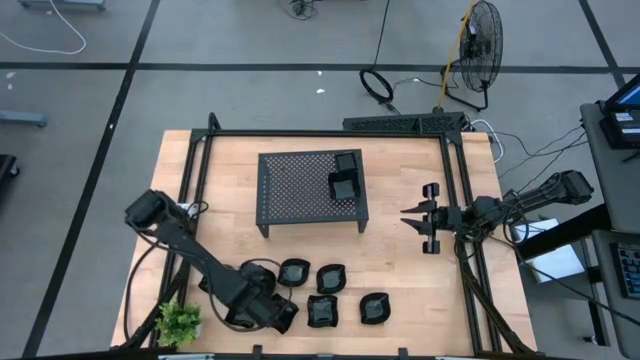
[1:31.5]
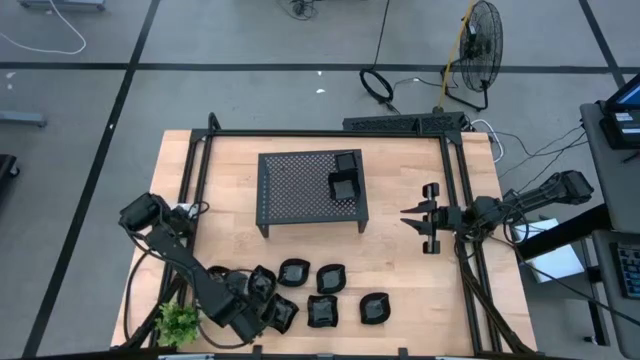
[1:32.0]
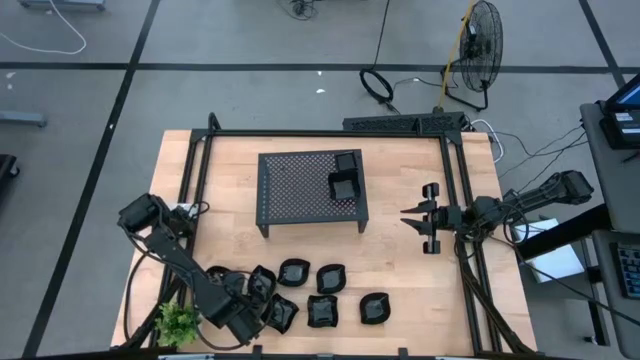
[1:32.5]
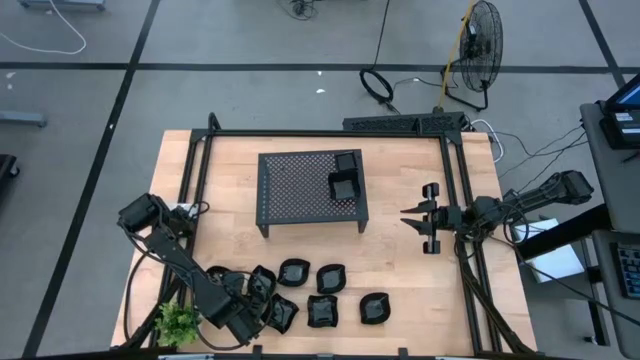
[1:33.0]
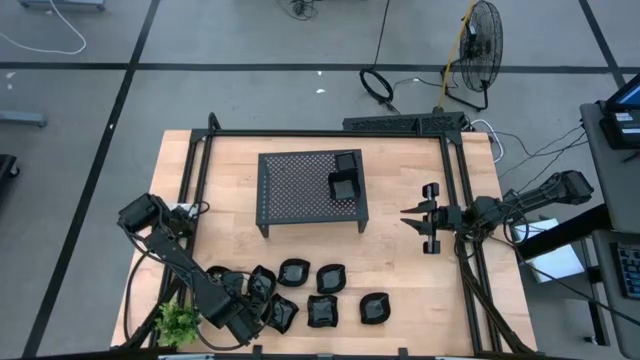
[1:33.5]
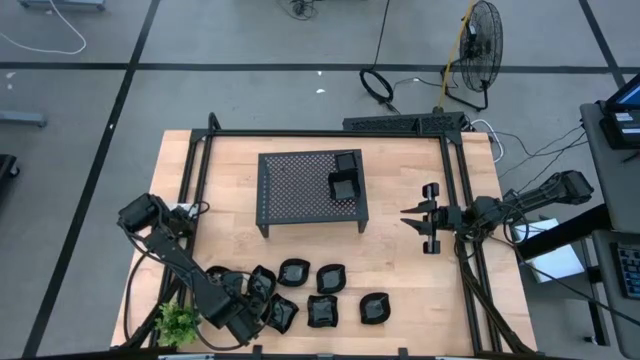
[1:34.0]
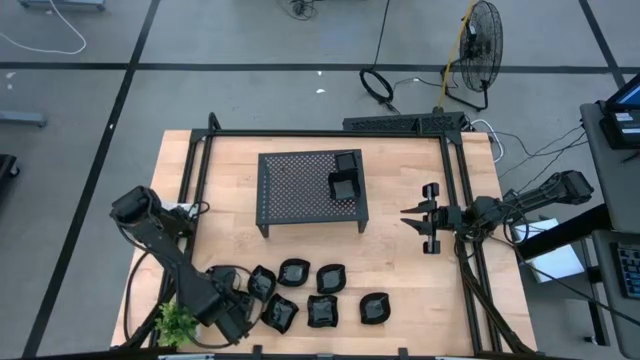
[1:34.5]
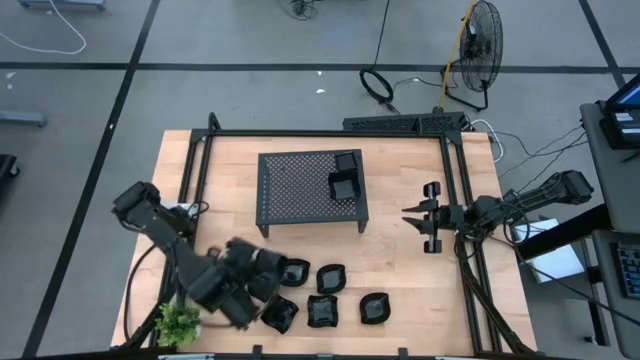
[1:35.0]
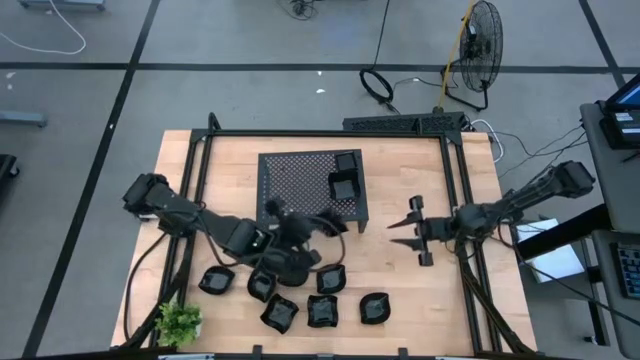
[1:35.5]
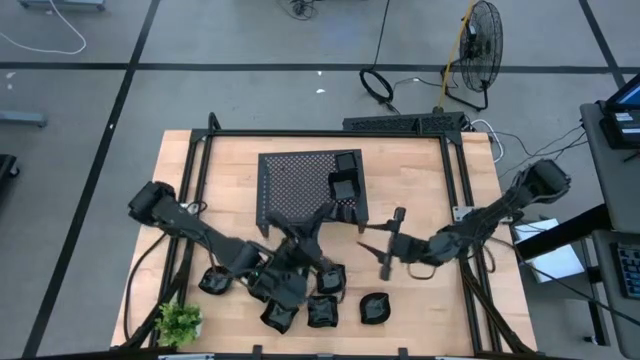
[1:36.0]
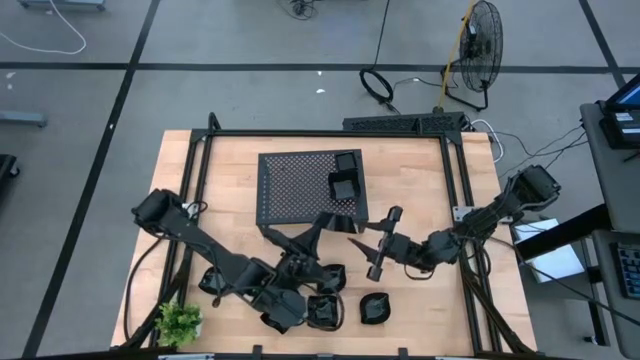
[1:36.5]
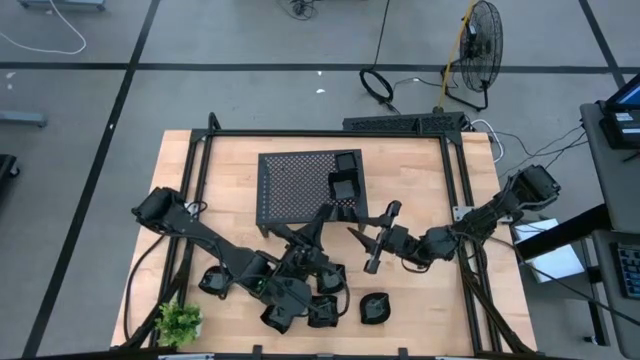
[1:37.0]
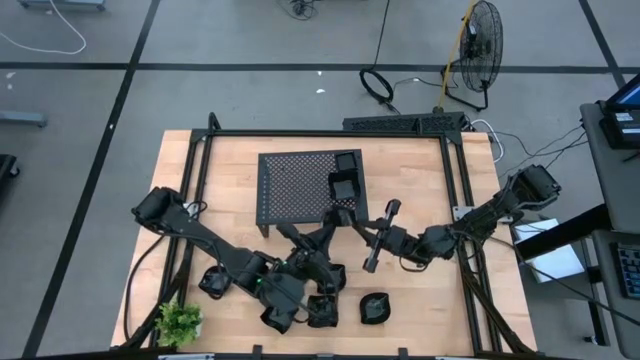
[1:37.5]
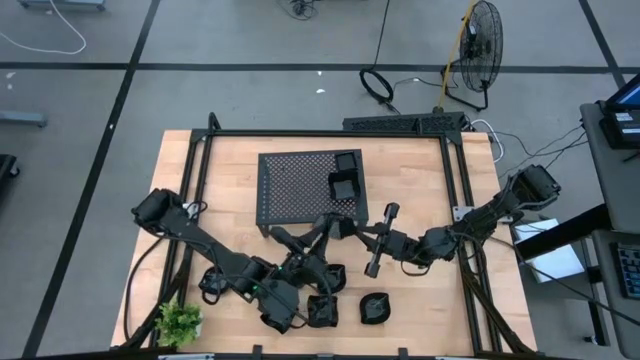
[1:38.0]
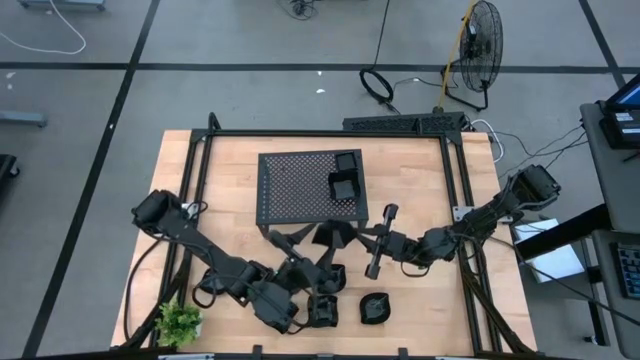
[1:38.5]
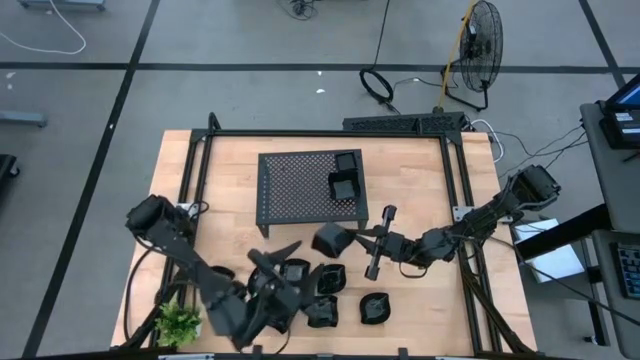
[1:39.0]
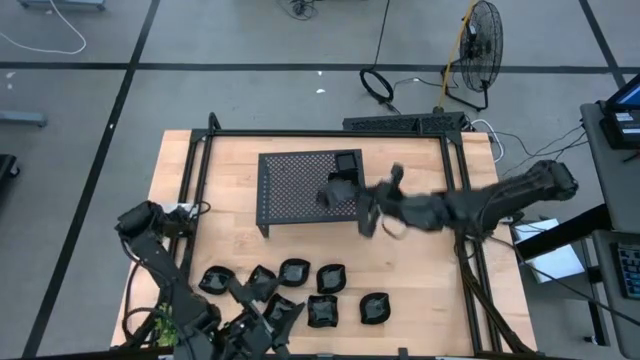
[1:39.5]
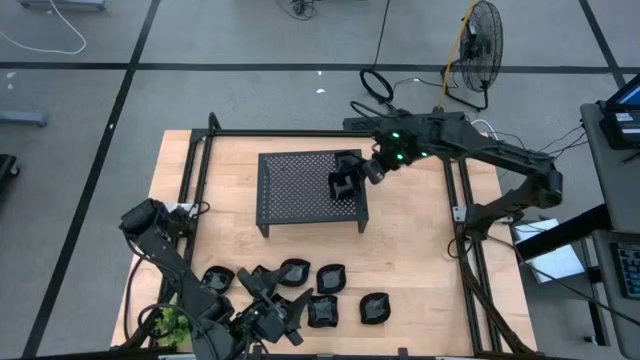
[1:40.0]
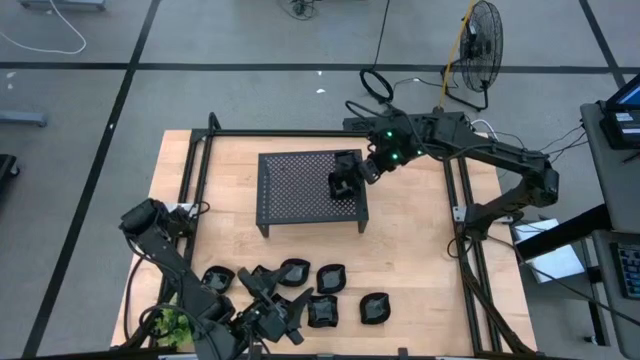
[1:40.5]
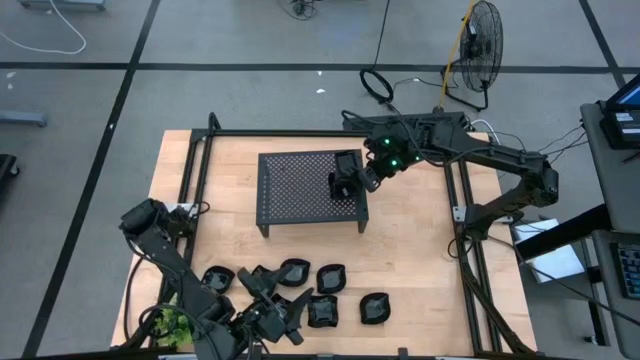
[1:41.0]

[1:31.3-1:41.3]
Task: Pick & Place Mini shaped plates
Stack the distorted square plate onto the stacked distorted square plate on the shelf

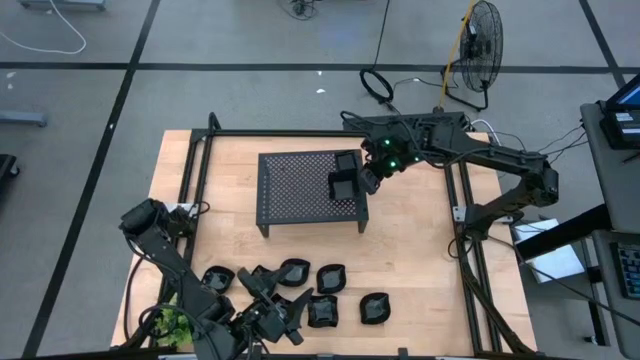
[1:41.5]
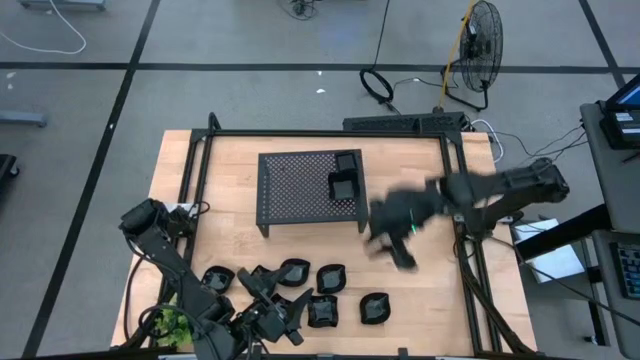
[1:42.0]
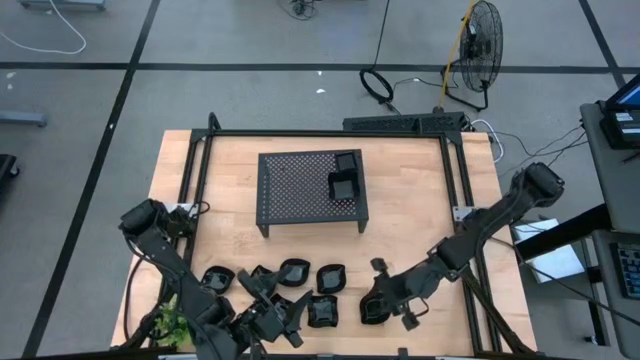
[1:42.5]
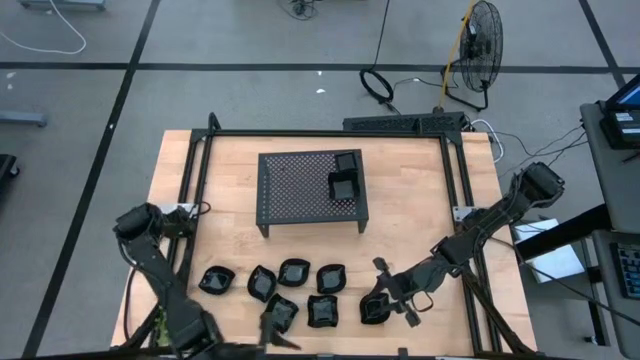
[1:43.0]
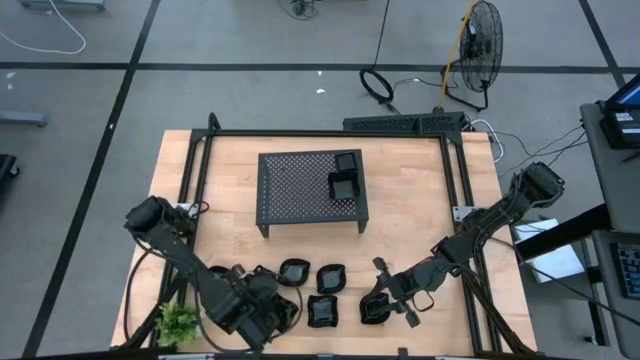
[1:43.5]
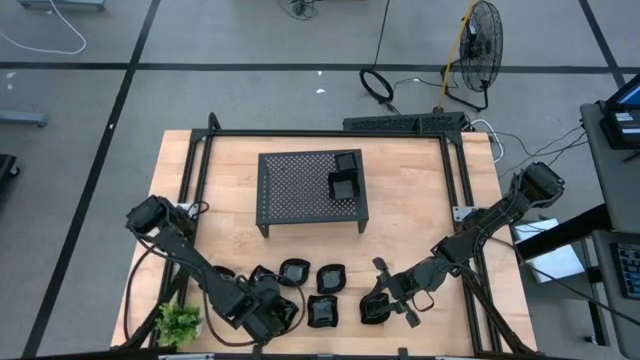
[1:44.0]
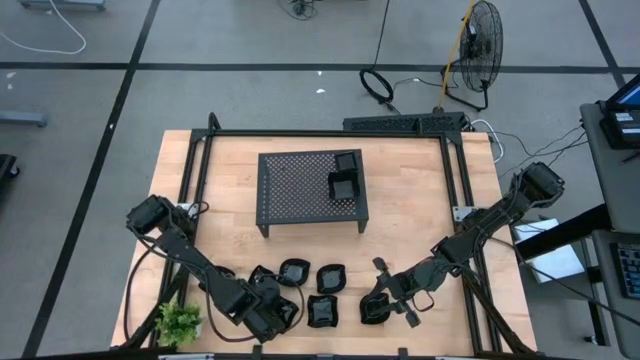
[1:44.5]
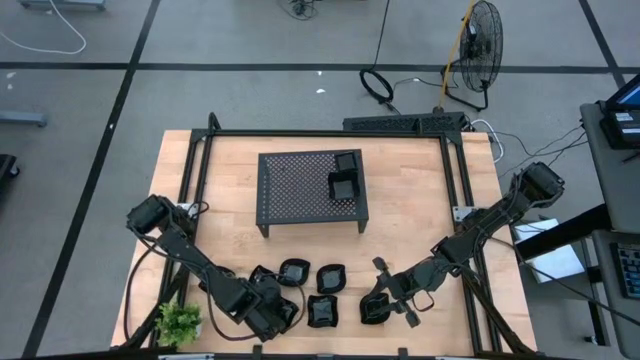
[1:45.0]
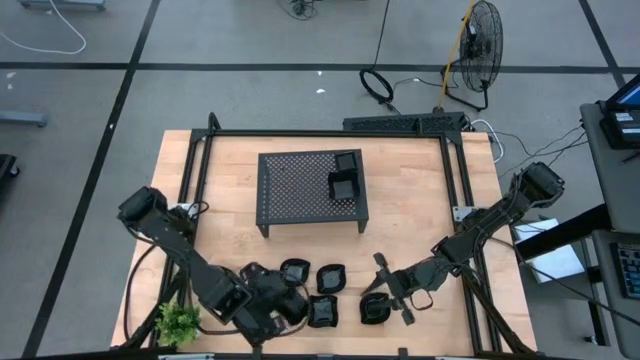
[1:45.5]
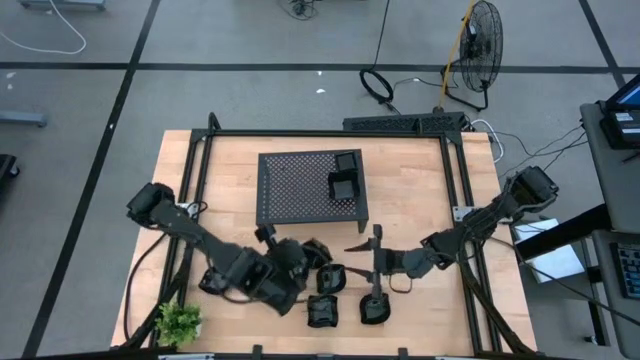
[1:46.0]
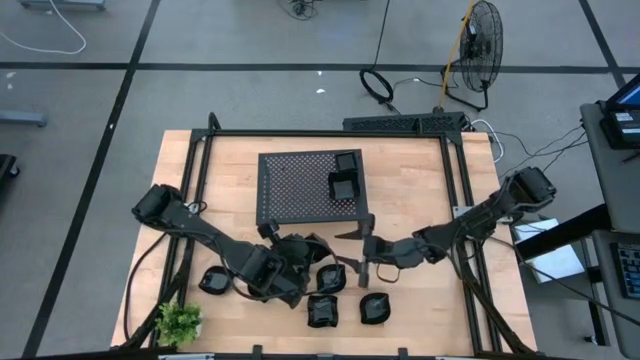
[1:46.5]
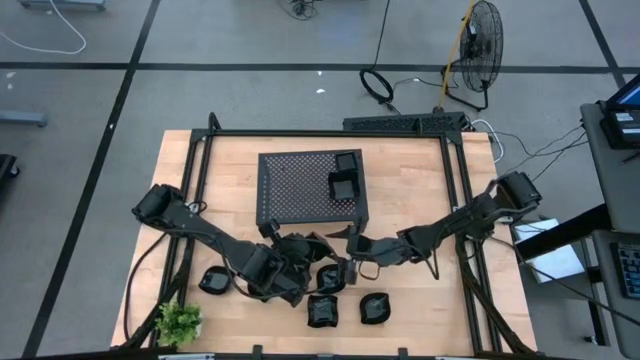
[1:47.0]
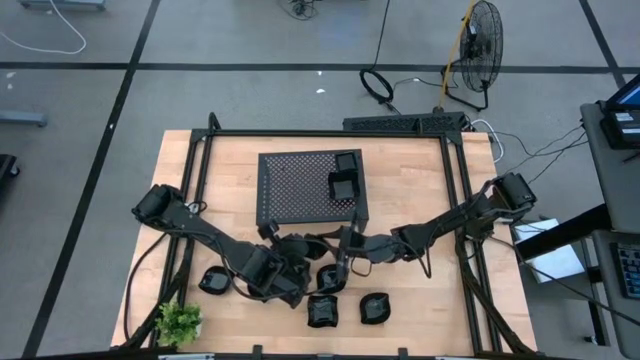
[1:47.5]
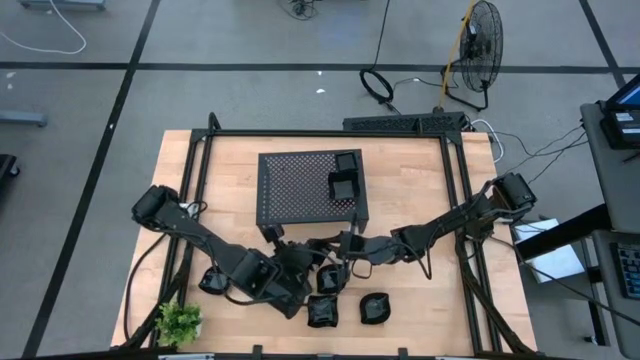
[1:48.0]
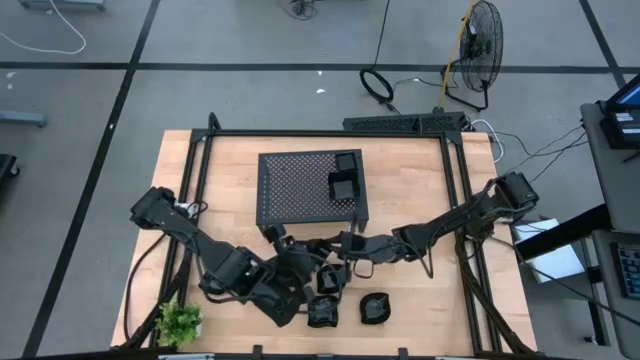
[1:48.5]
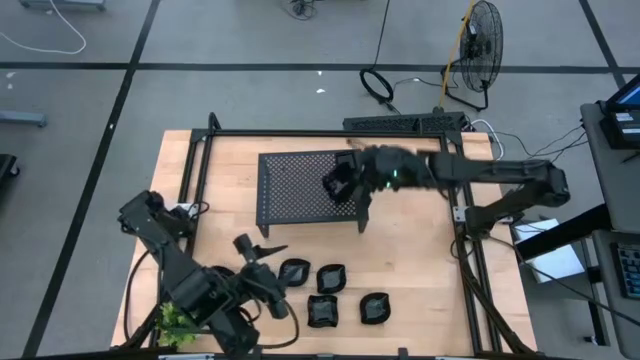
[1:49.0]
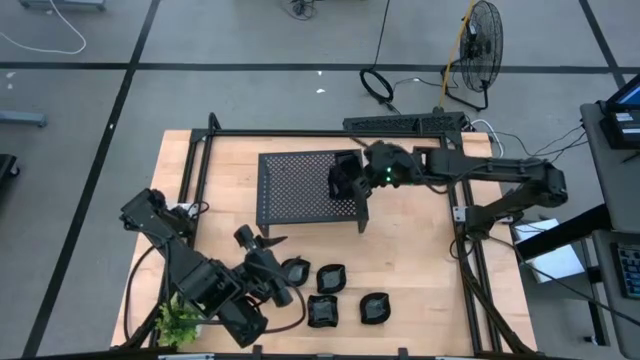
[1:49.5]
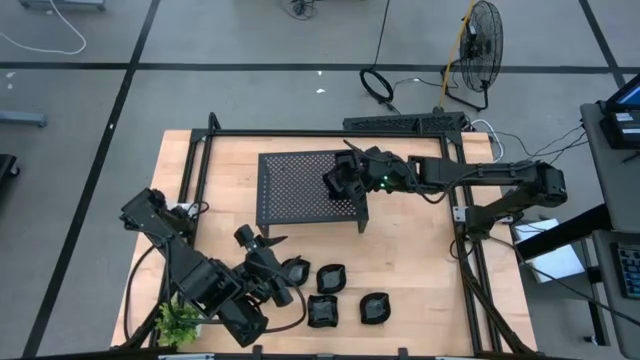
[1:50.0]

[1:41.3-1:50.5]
Stack the distorted square plate onto the stacked distorted square plate on the shelf

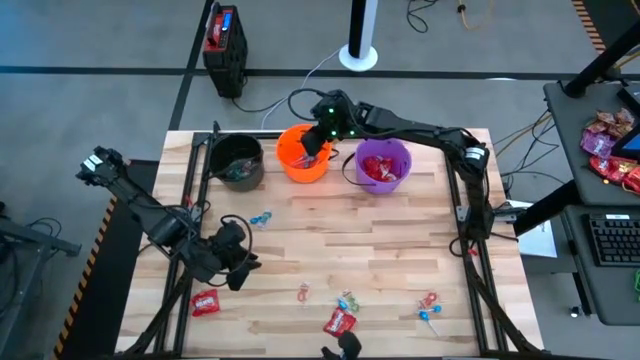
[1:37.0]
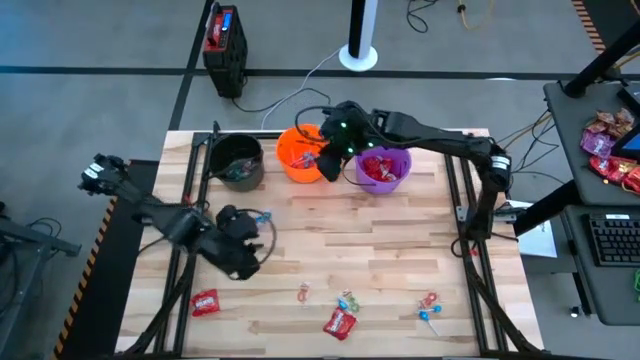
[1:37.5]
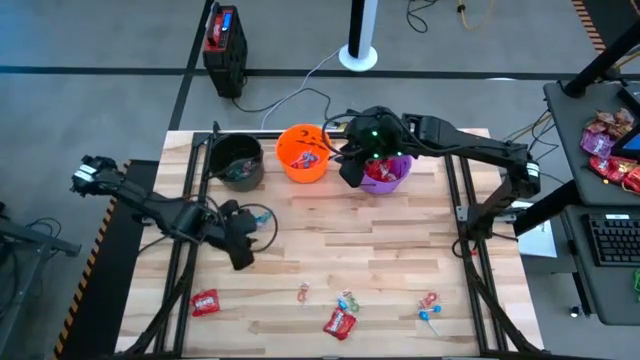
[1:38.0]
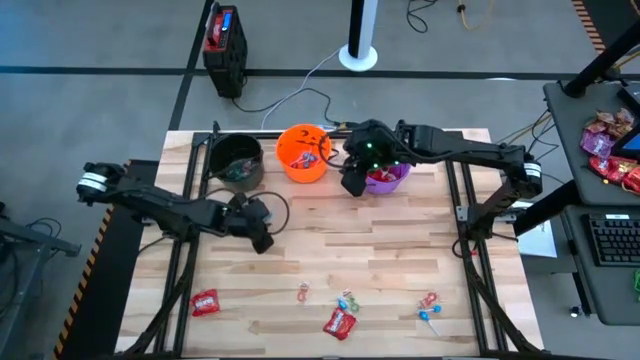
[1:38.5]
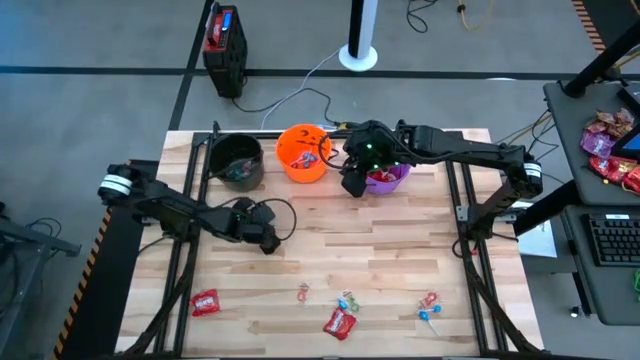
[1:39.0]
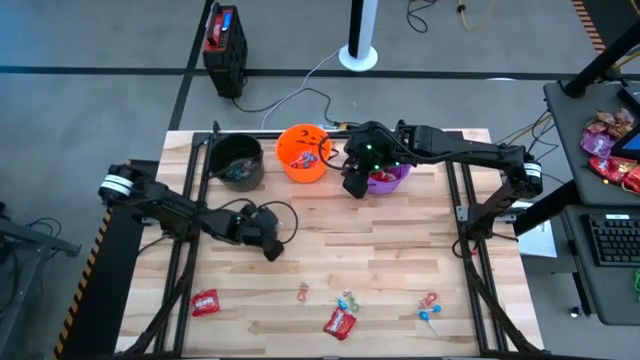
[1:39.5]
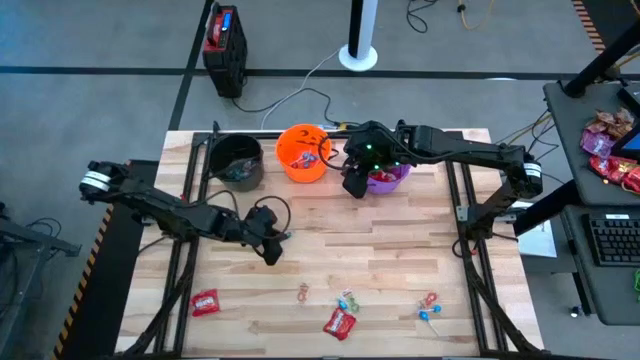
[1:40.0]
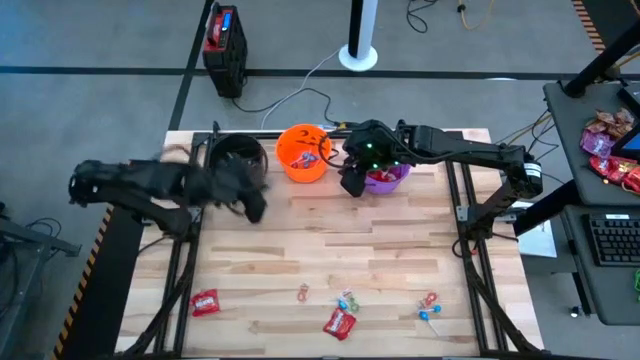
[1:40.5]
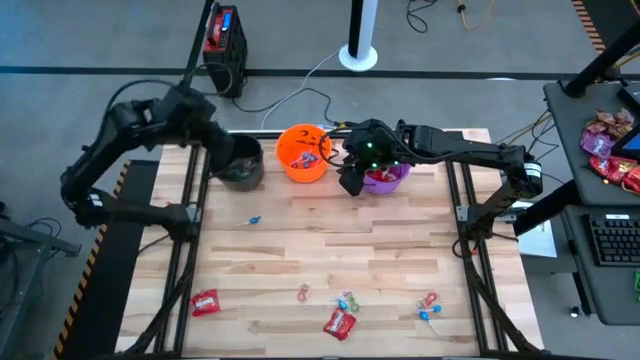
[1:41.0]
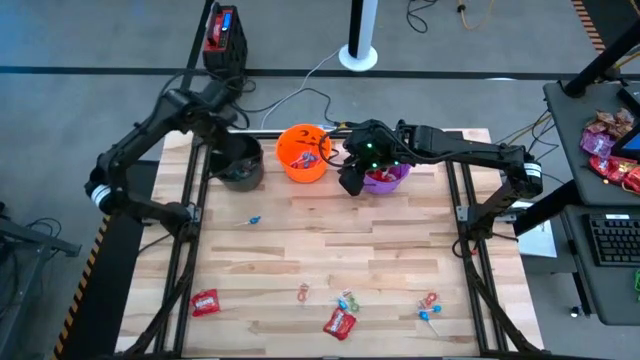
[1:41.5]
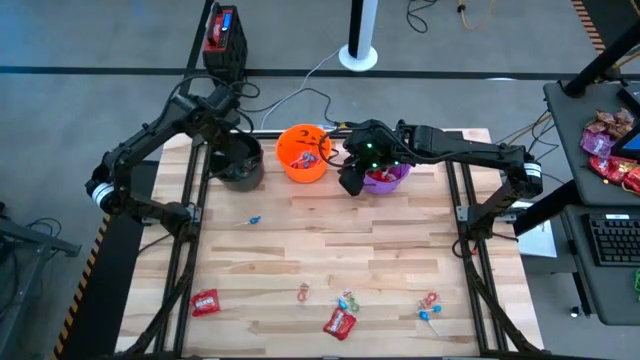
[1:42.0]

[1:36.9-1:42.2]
Task: Sort candy by brand, put in halloween buckets
Put the blue gummy into the black bucket
